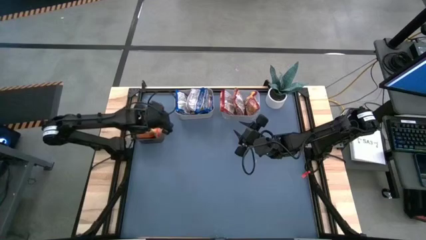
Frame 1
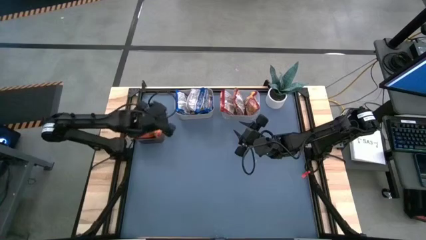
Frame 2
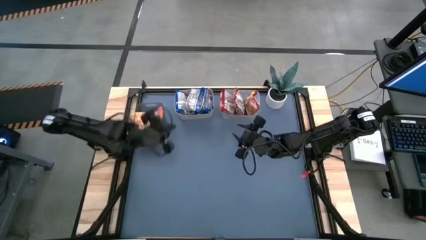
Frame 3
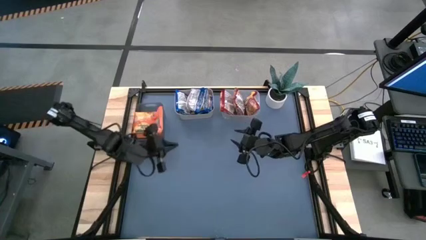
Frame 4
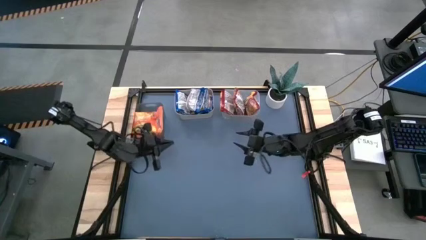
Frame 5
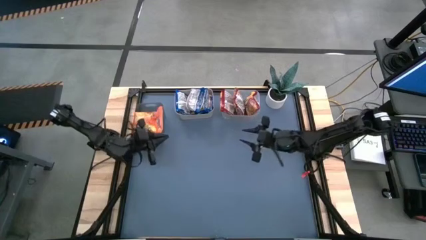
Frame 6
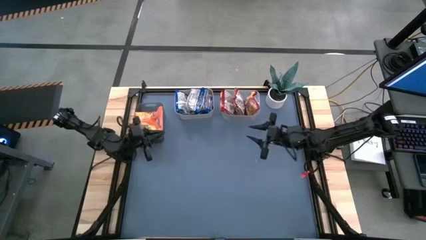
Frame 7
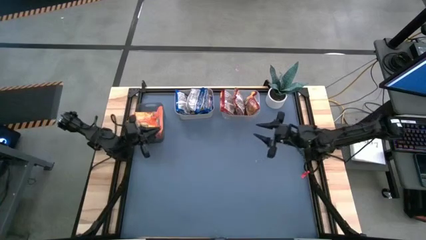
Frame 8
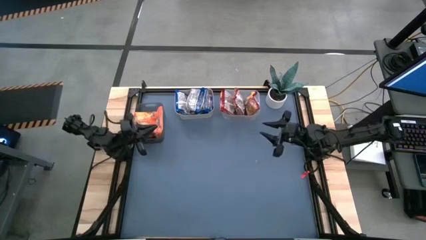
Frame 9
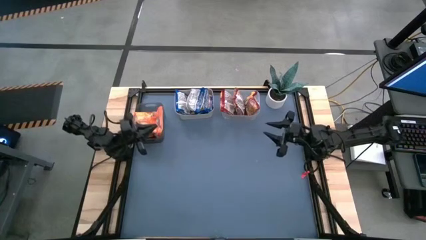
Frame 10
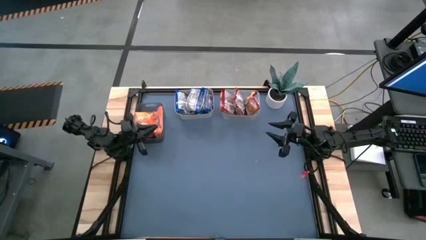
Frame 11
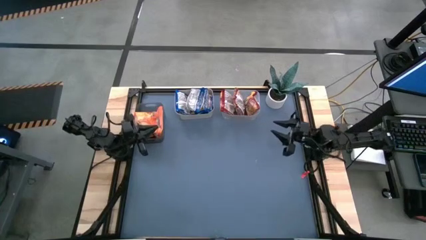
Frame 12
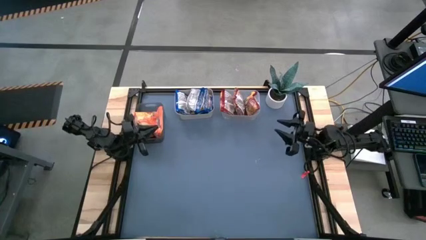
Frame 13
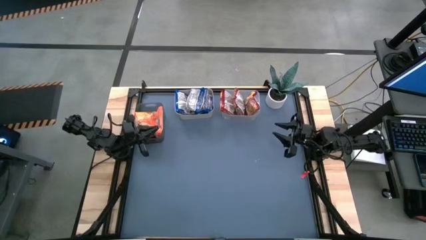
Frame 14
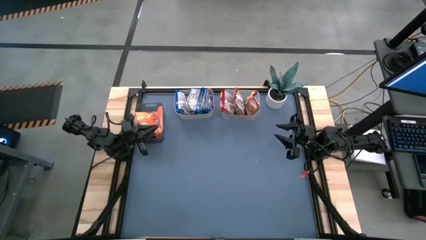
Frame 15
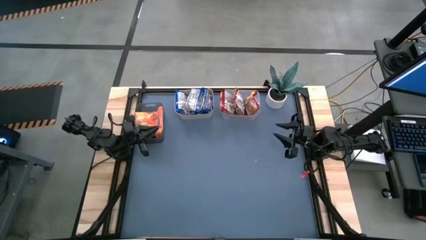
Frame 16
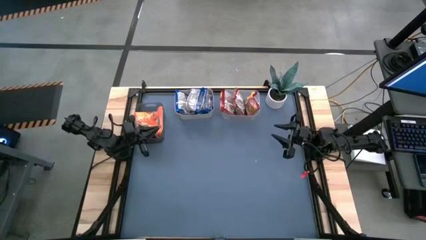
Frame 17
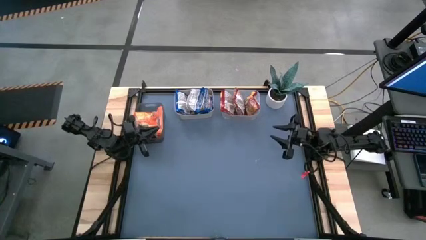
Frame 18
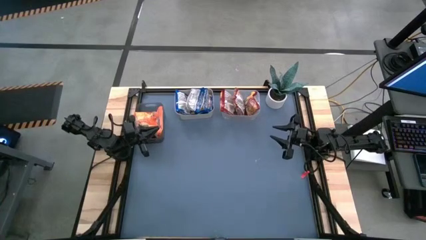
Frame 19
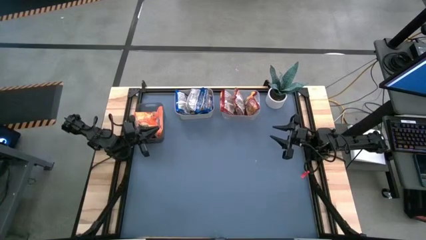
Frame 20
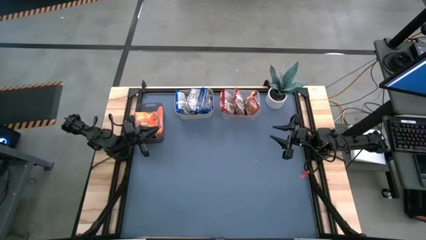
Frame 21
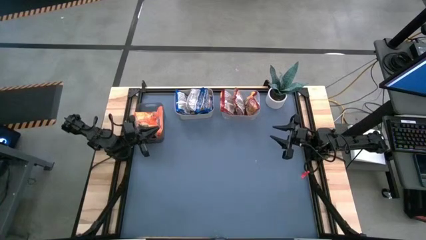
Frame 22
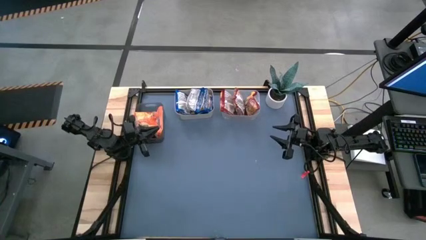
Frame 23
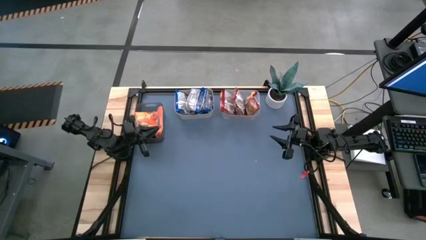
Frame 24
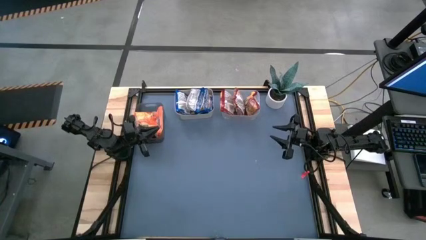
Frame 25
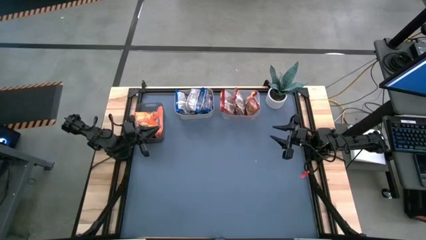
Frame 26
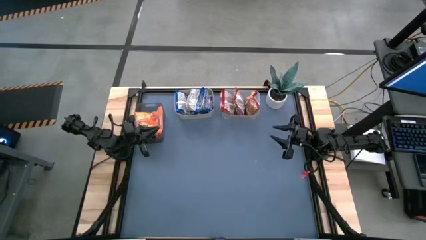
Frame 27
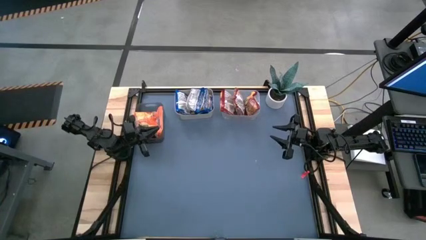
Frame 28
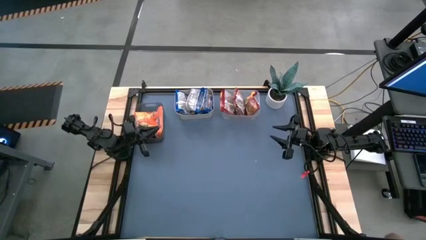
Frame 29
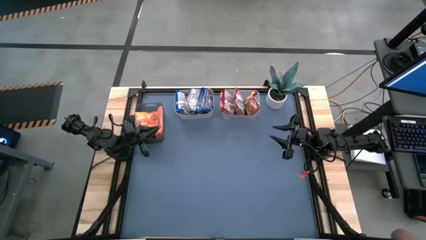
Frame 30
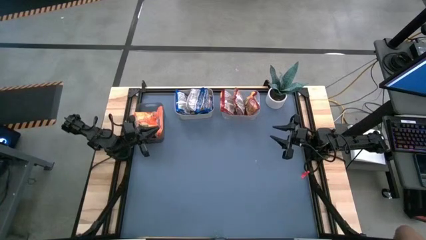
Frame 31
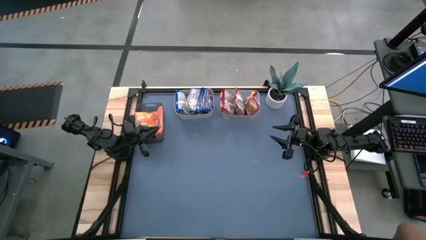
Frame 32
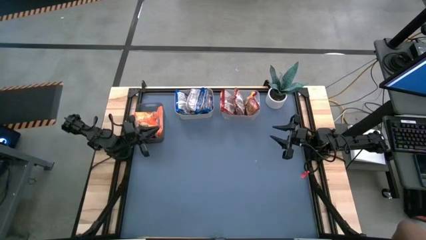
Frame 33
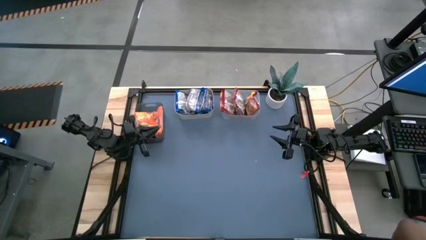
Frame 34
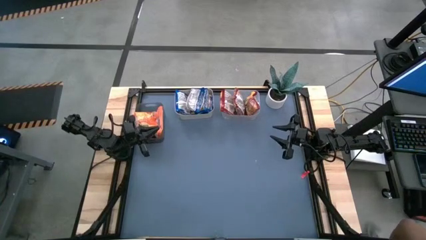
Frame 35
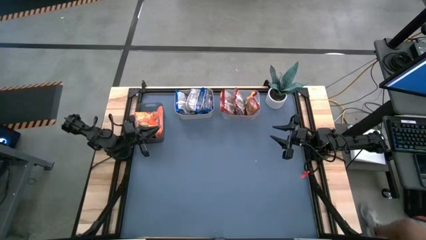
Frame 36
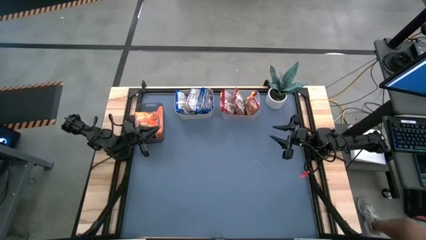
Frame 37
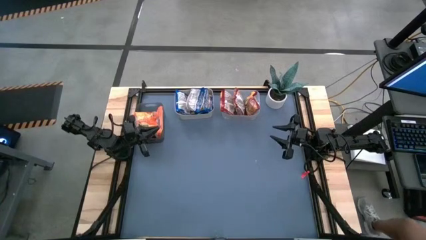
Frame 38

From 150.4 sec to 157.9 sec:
Task: Sort Maruchan noodles
Return to Home Position

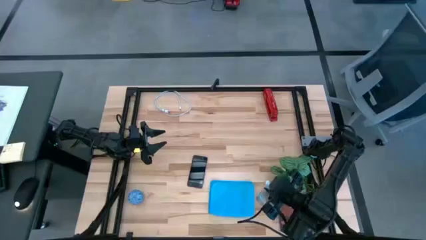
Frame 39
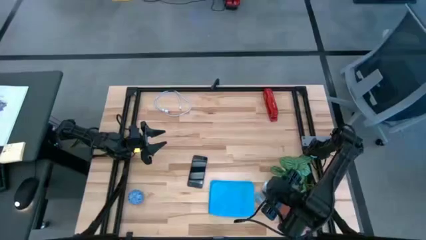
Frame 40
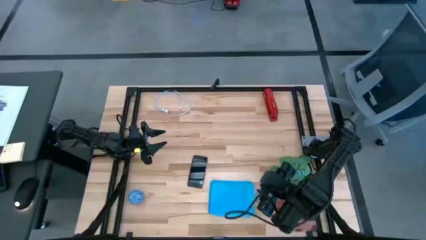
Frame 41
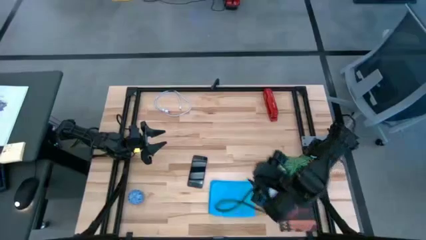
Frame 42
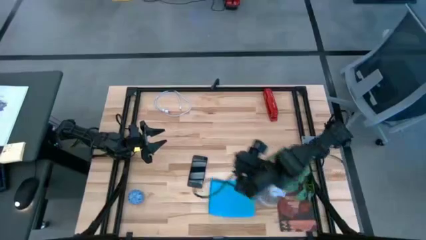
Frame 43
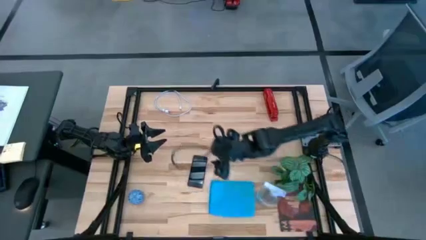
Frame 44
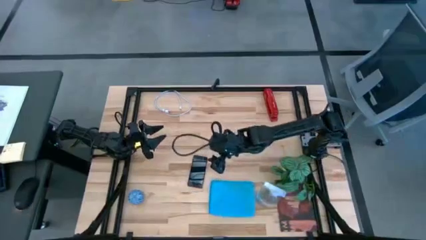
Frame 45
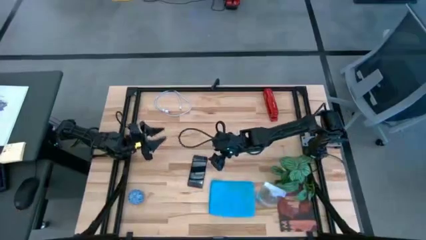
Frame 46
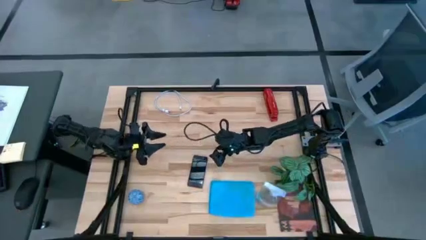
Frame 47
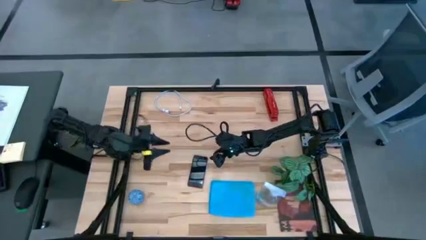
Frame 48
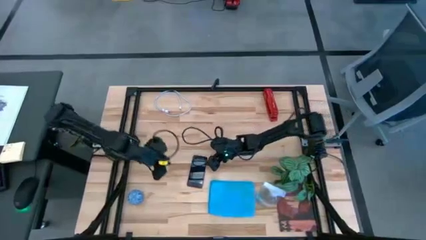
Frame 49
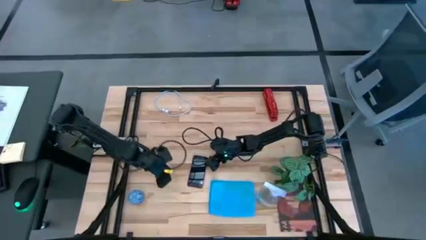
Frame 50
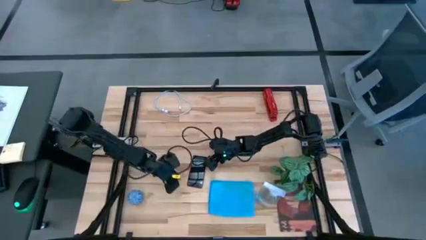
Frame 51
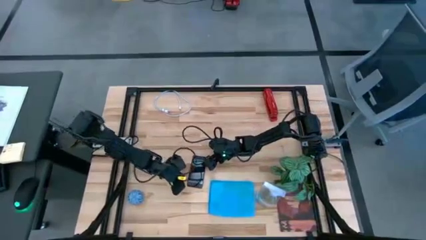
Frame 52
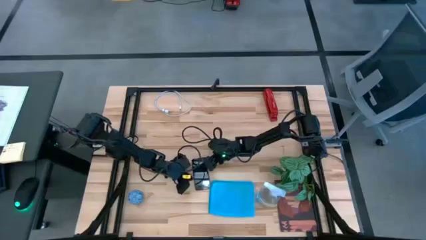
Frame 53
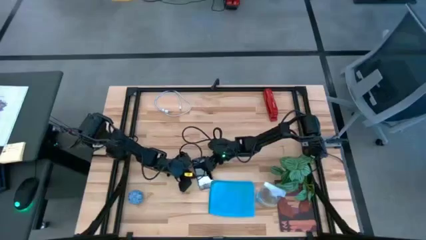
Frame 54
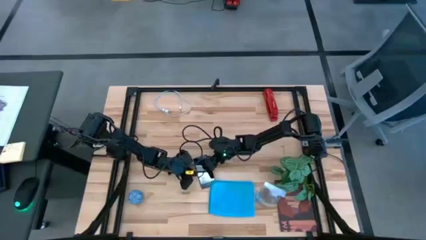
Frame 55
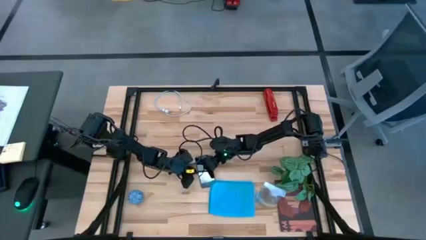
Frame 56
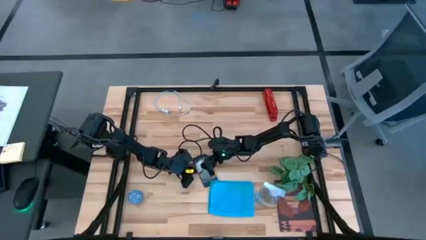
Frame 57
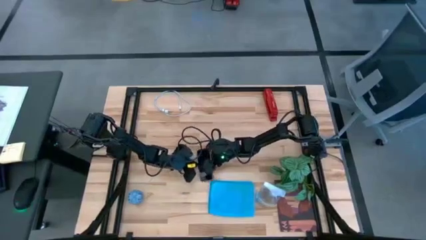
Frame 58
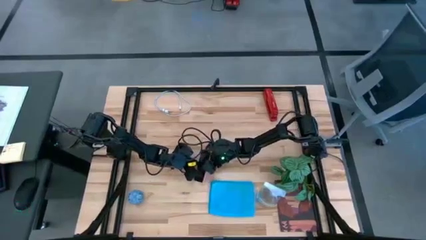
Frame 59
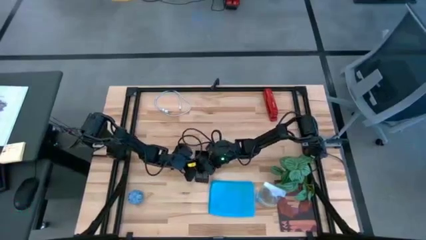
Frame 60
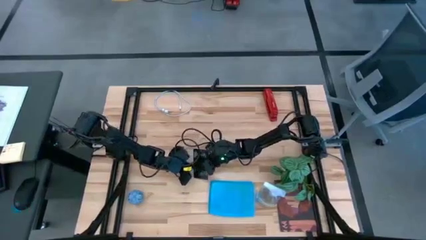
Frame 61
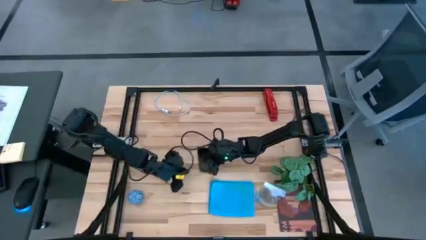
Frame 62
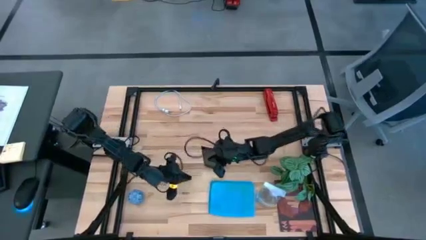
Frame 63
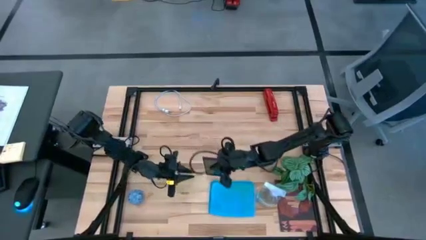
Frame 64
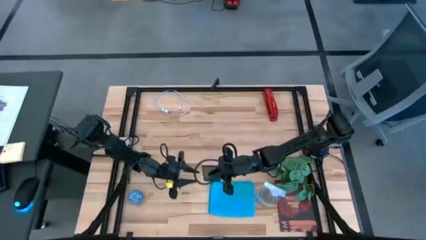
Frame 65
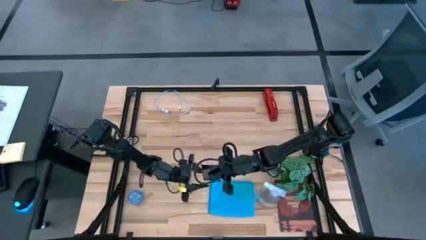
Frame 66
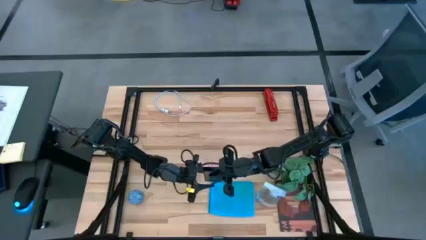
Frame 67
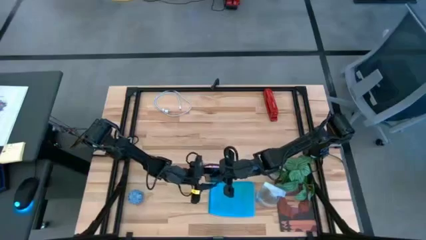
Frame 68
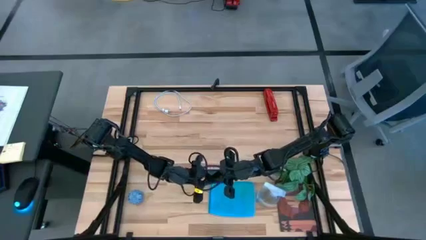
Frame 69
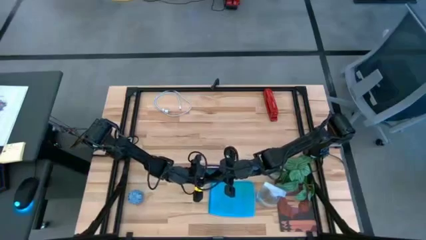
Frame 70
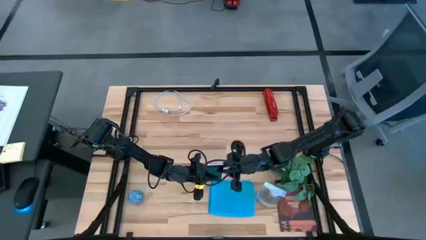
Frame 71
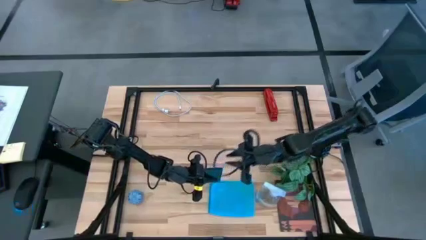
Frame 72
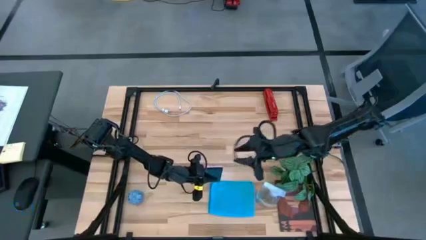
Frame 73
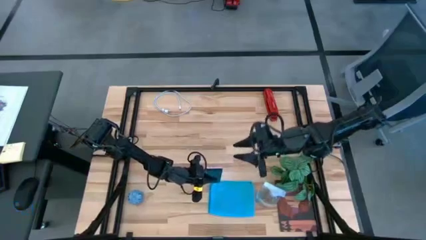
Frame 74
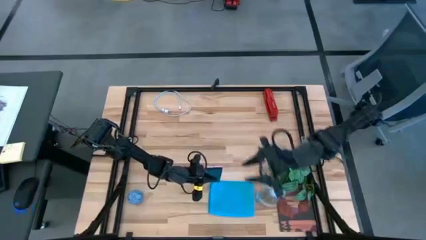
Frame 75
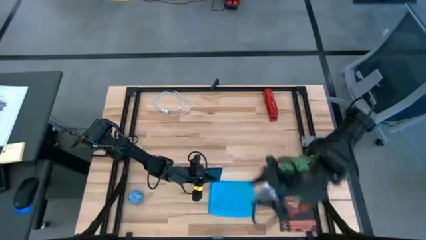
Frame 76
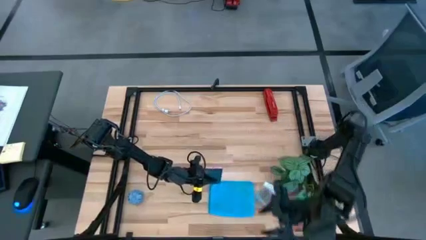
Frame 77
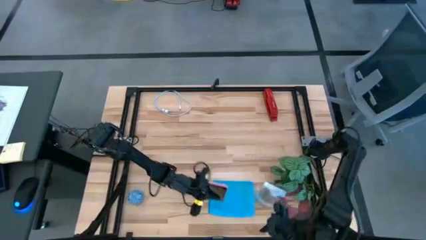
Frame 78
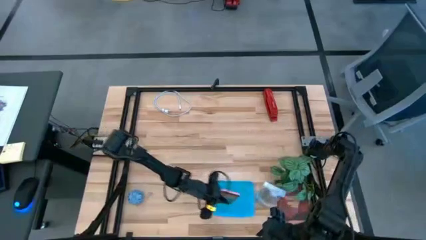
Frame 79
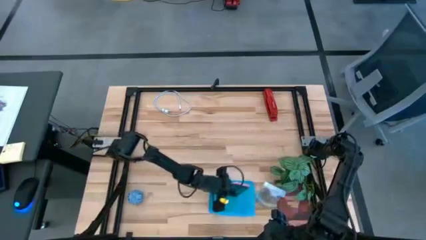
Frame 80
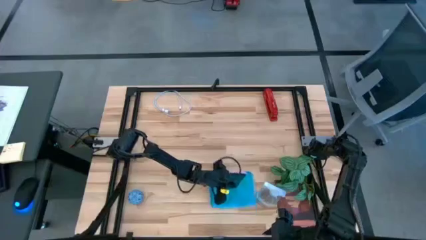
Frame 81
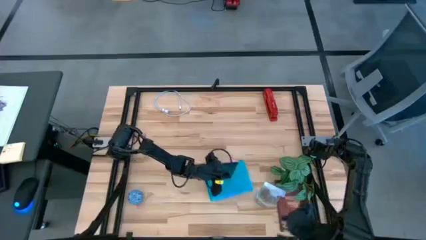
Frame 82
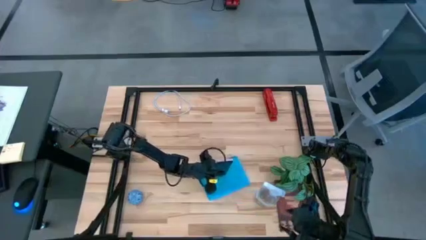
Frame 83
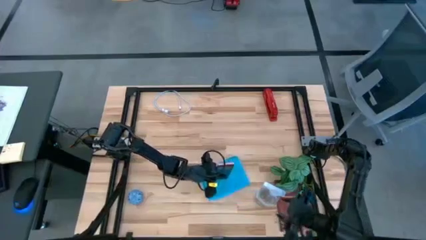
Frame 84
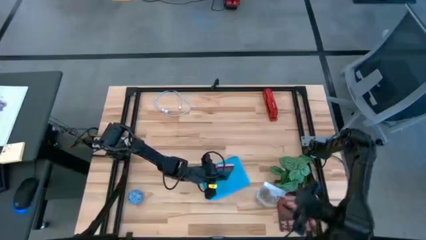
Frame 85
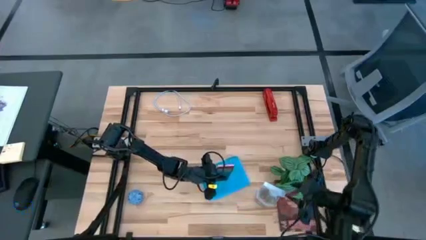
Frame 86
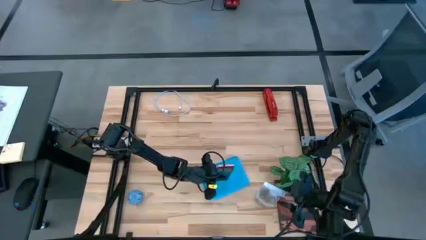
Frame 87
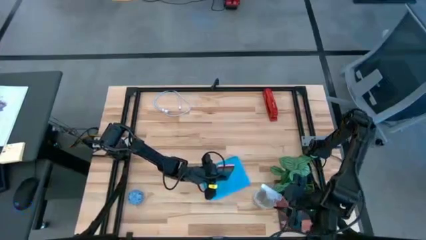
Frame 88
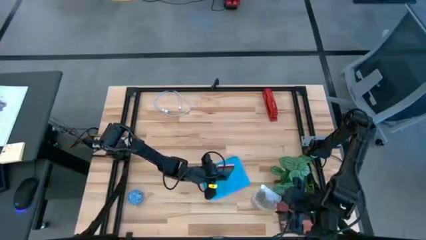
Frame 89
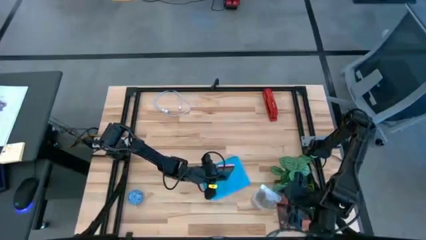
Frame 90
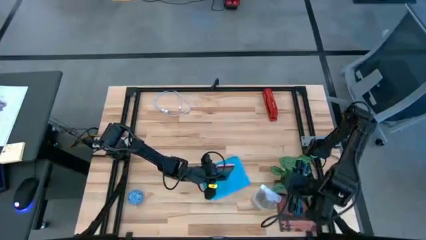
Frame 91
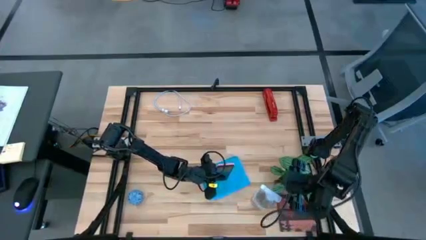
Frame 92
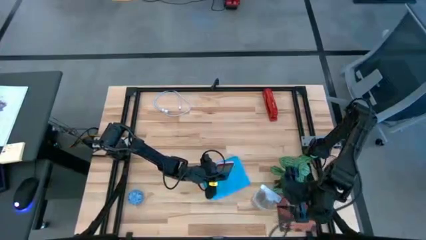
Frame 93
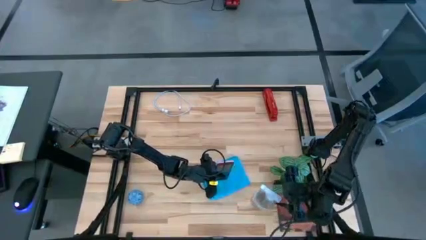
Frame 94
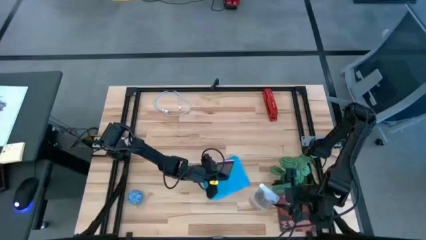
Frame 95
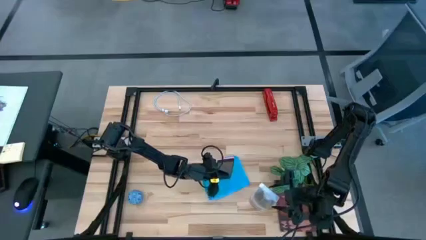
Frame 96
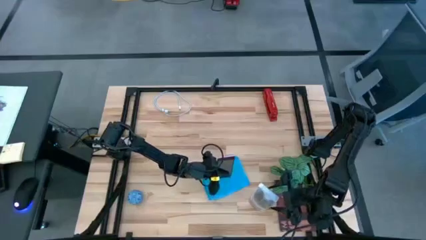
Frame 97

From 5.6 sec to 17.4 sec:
Task: Apply microfiber cloth
Spray the front of the cellphone with the spray cleaning bottle
